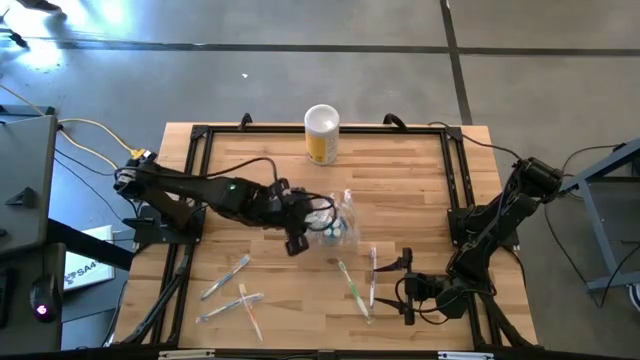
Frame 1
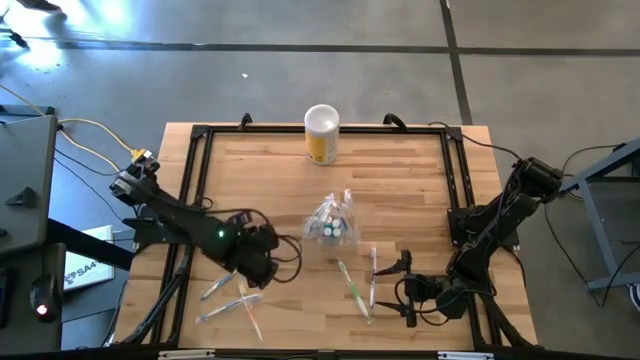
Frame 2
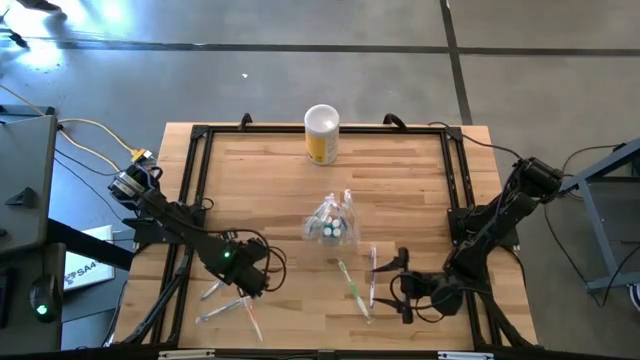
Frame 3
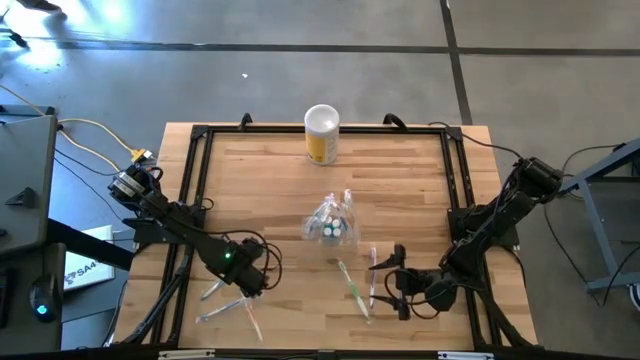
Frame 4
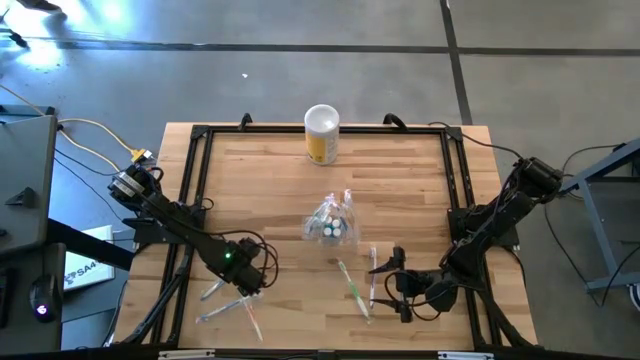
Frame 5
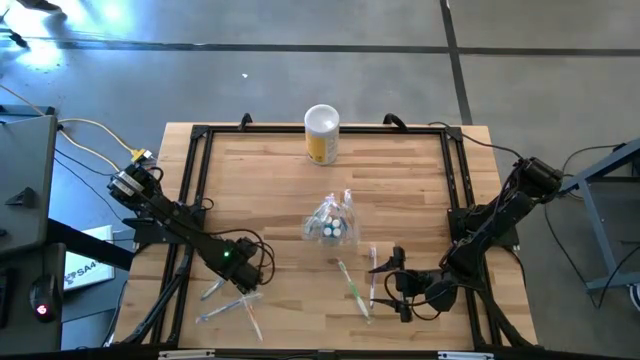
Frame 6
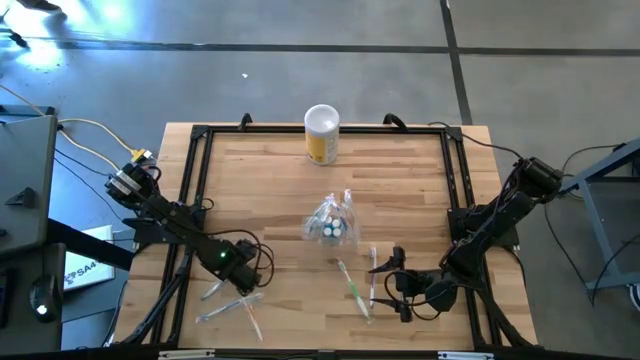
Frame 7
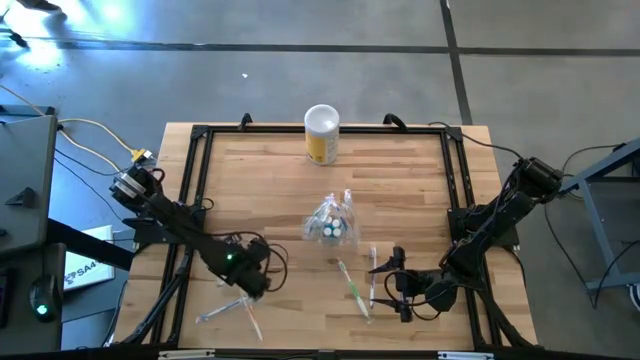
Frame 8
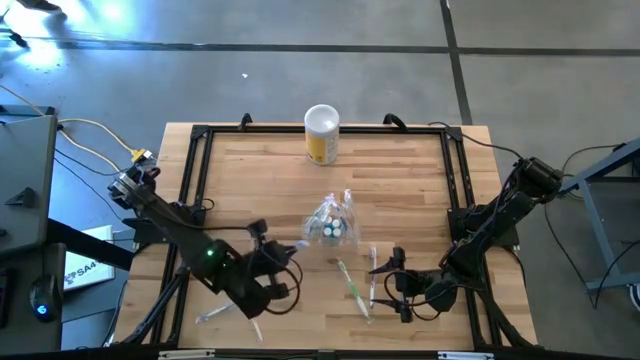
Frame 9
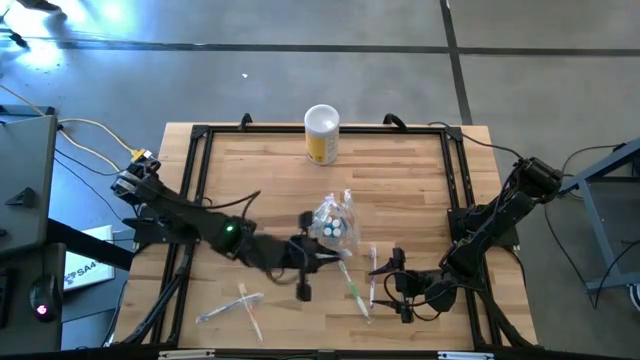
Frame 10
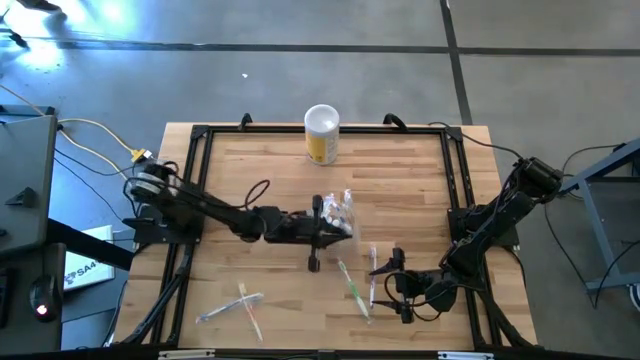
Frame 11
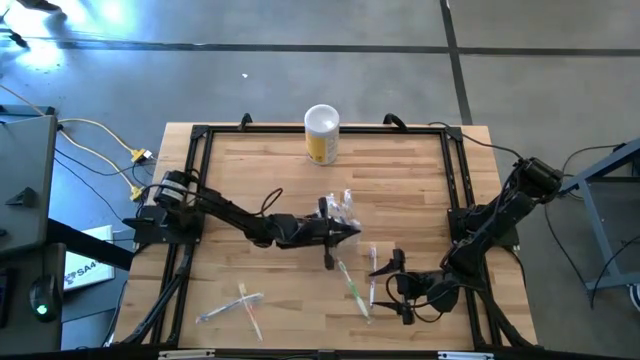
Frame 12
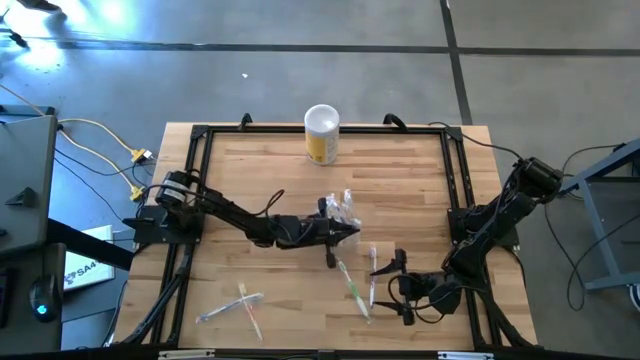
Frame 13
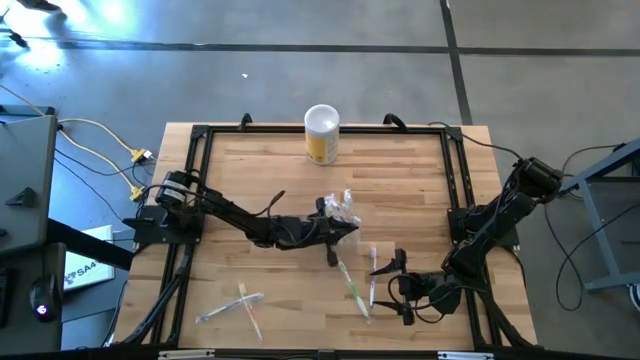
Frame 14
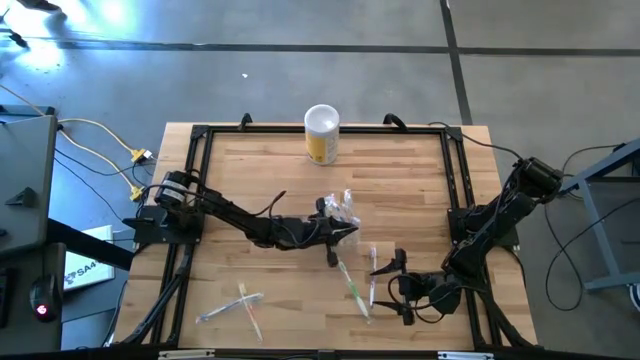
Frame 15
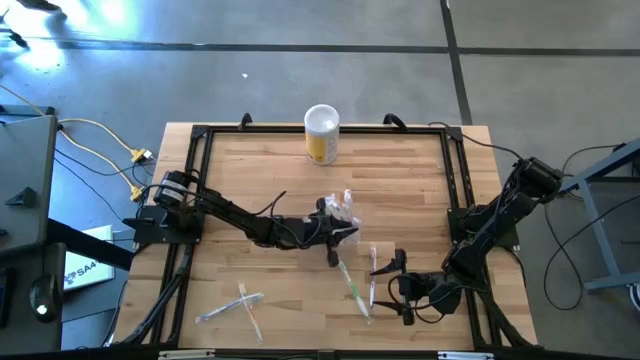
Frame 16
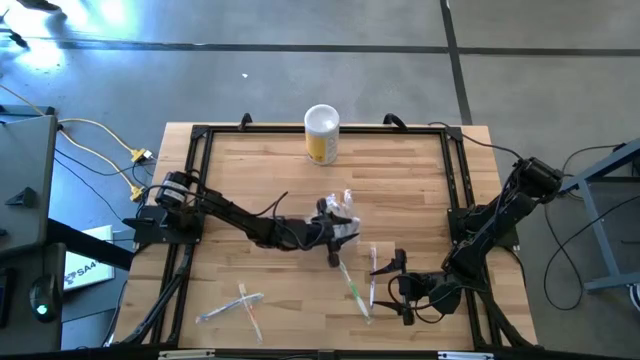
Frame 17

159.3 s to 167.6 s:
Task: Pick & Place toothbrushing station
Put the blue toothbrush into the left part of the transparent organizer

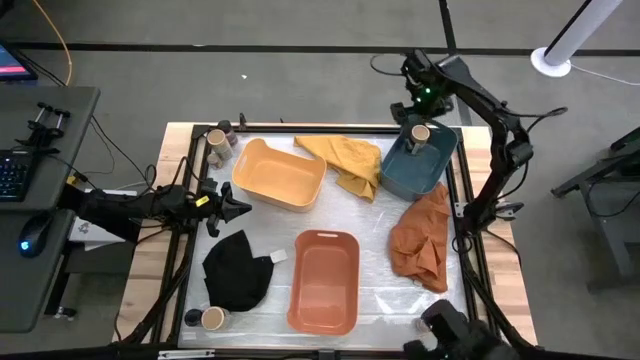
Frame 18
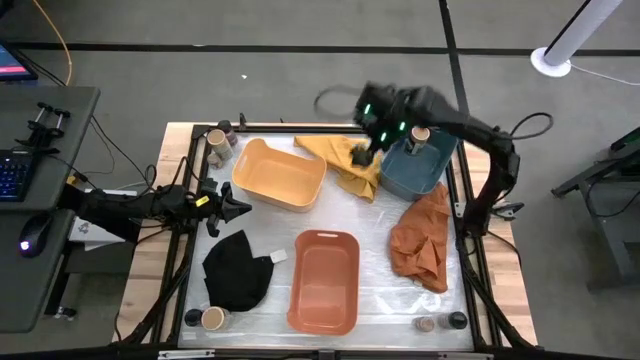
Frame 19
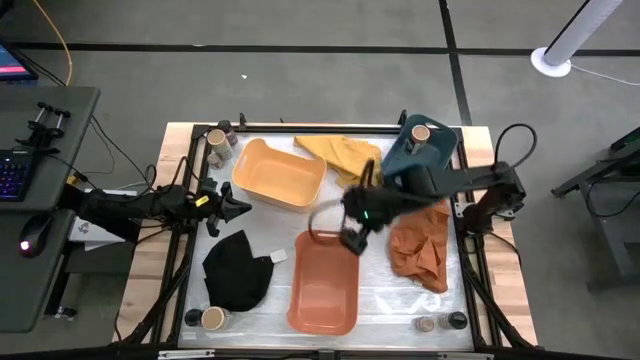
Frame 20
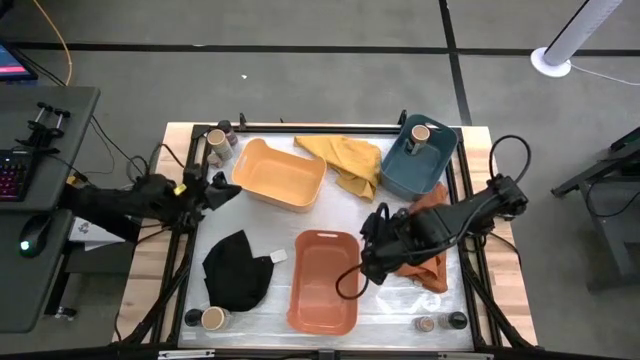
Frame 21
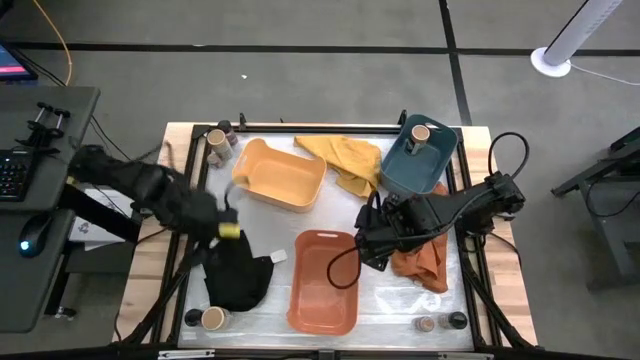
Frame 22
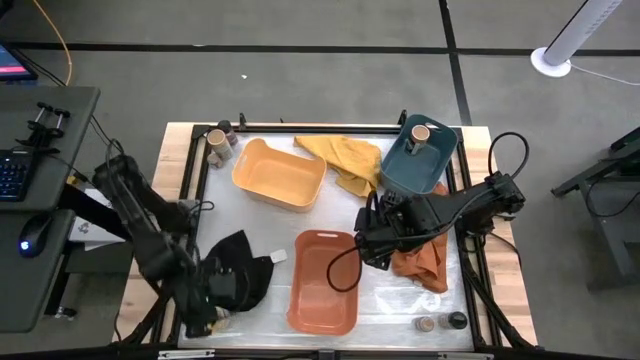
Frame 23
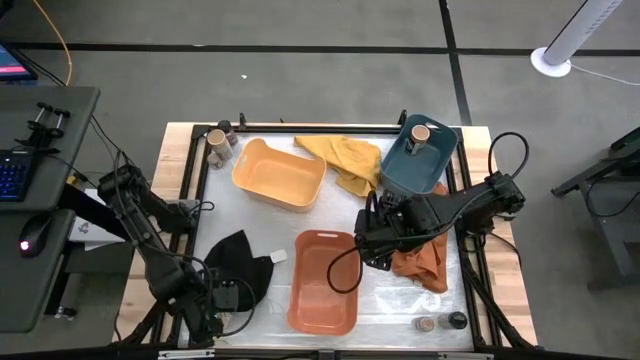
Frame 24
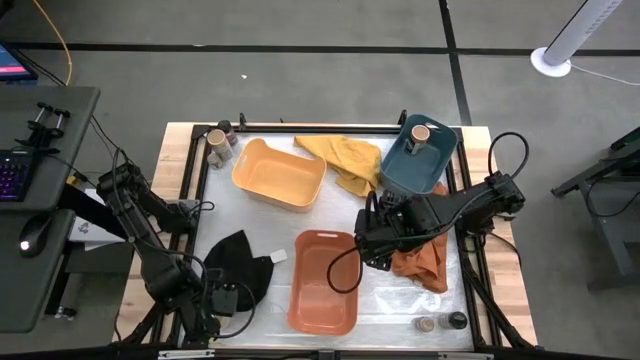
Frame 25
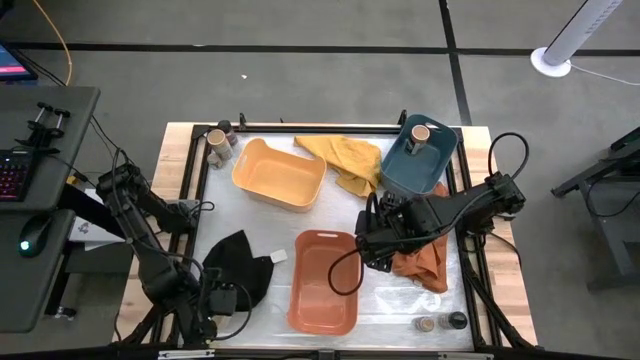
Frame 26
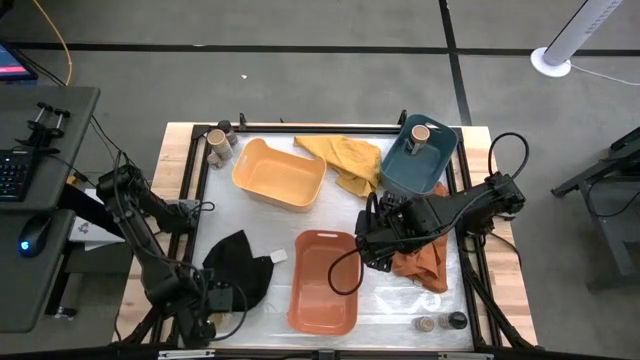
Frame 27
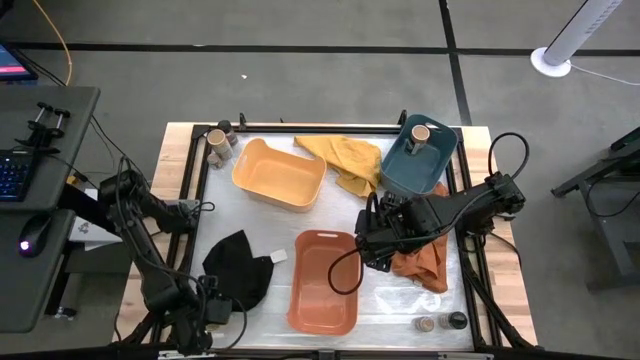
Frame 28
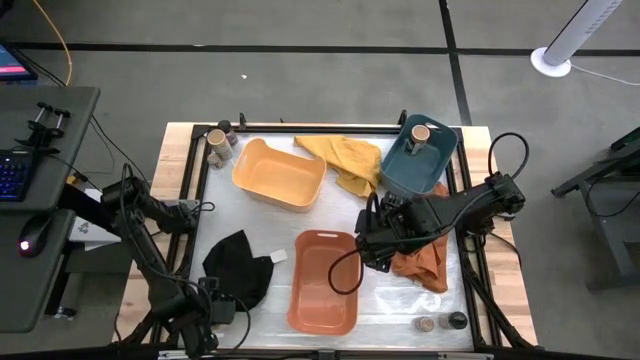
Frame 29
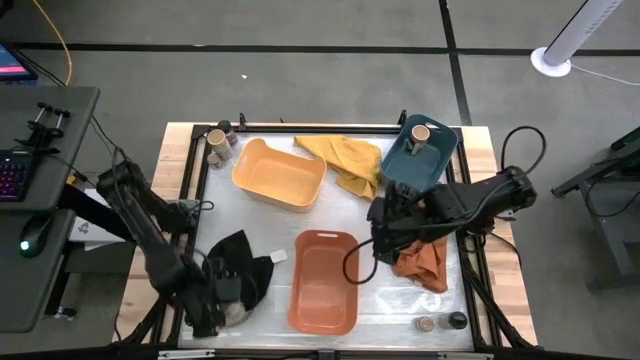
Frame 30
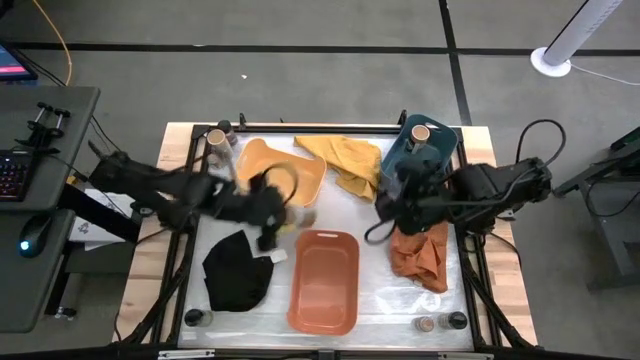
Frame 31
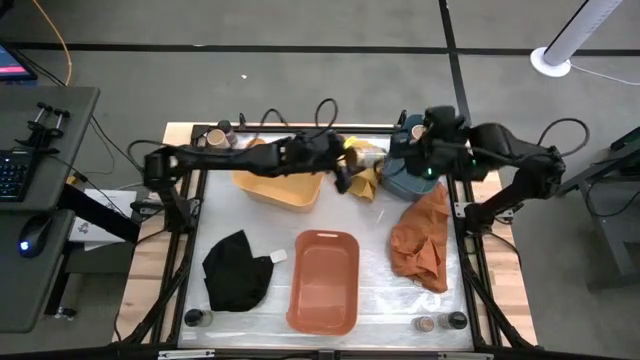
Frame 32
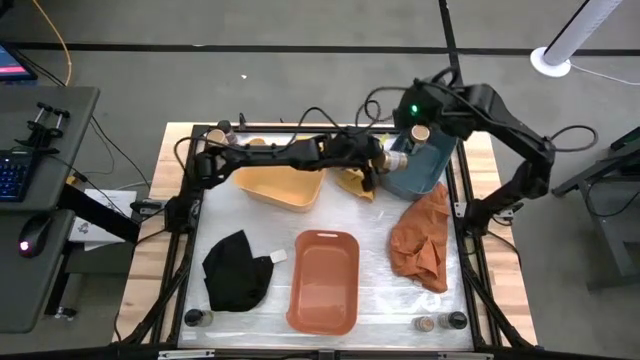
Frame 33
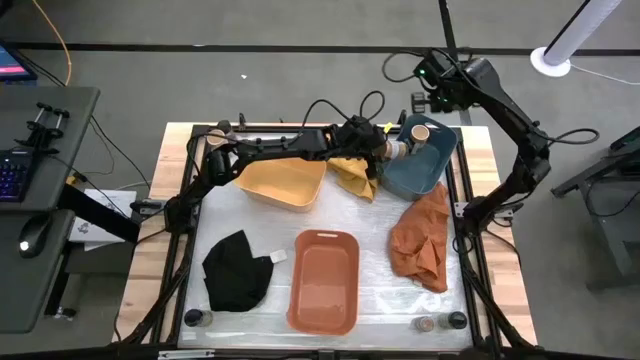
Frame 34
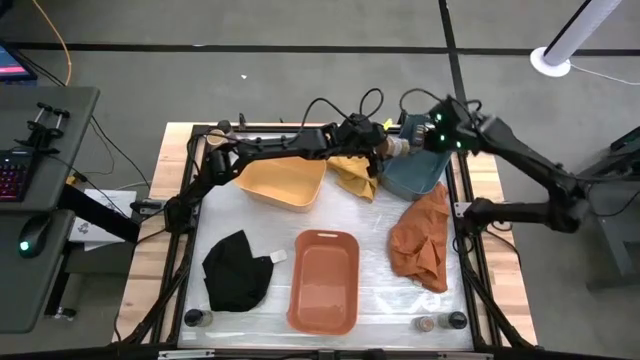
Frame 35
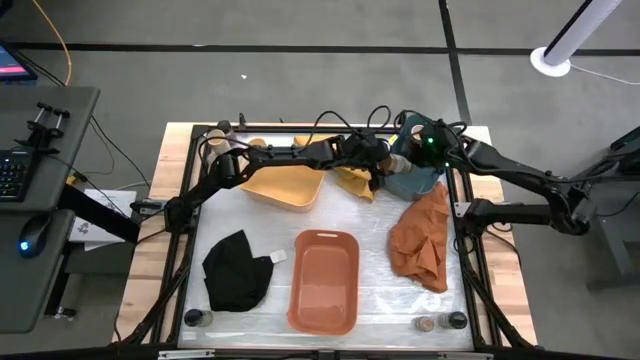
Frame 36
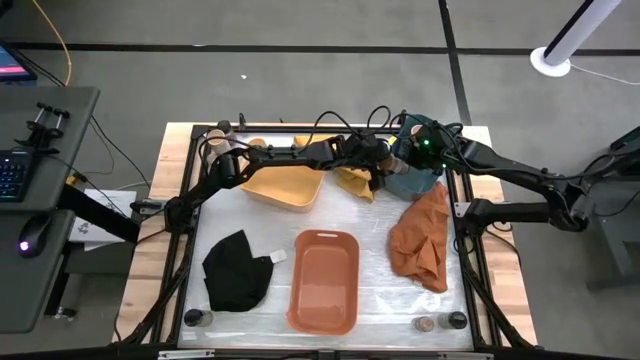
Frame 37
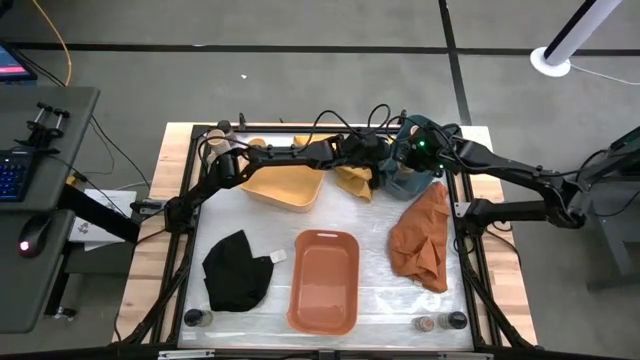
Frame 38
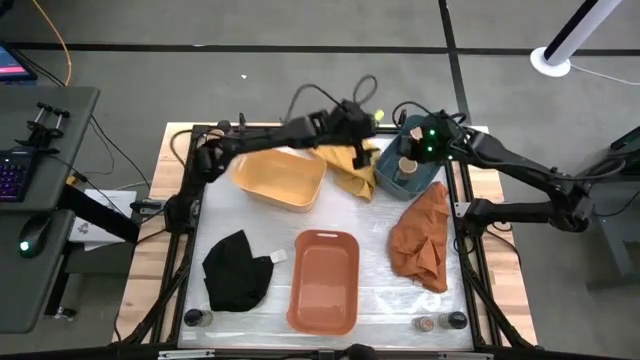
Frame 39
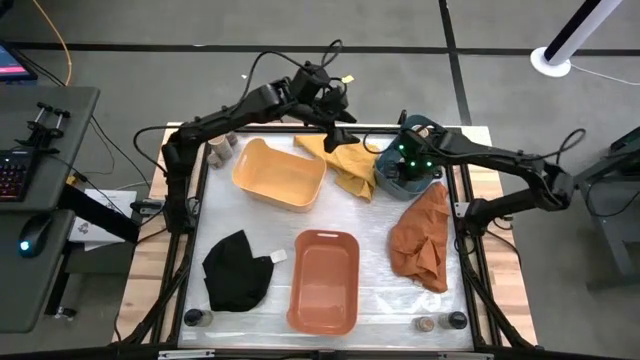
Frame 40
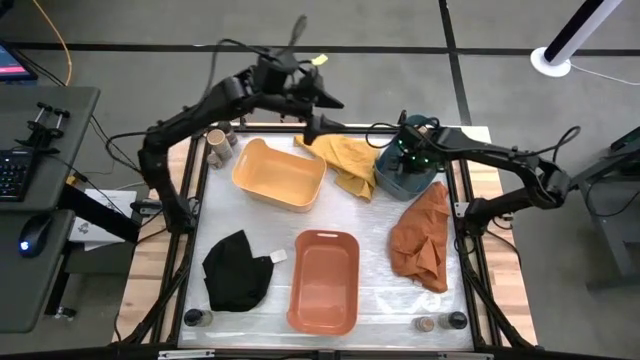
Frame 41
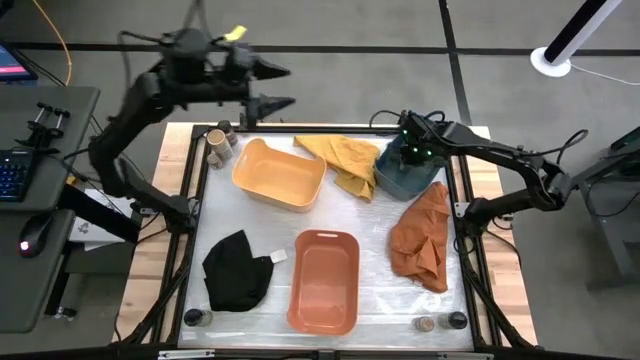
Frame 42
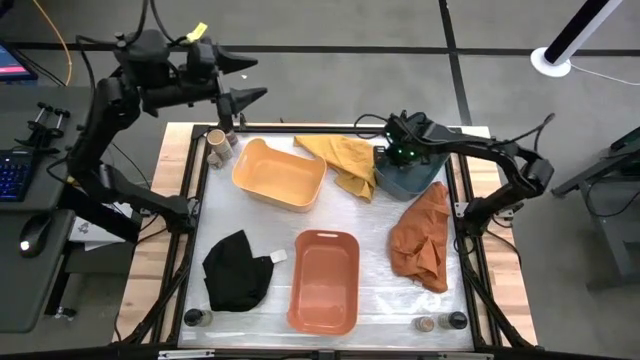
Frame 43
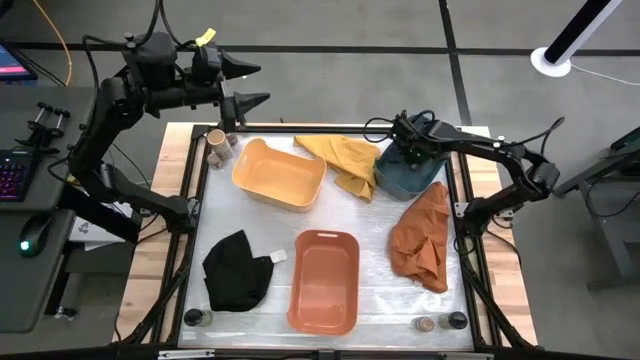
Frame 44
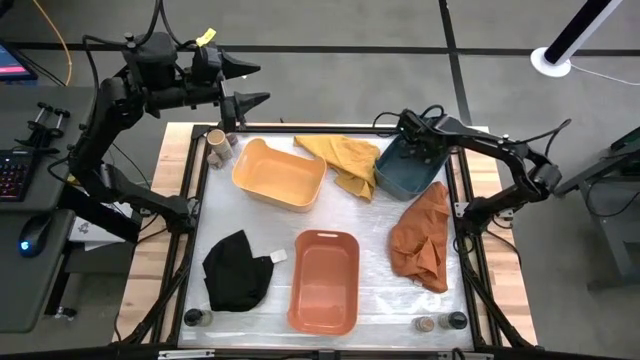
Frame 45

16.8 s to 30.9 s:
Task: Sort spices by type
Put the bottom gold seasoning bottle into the blue bin
